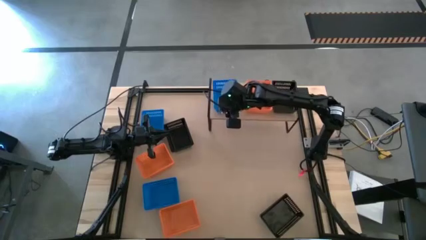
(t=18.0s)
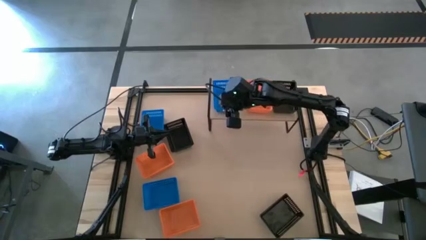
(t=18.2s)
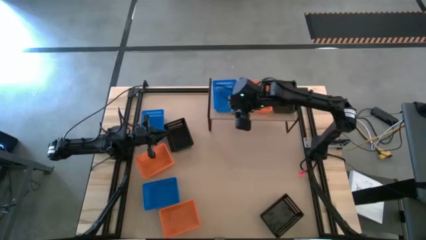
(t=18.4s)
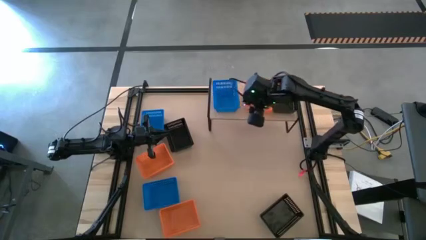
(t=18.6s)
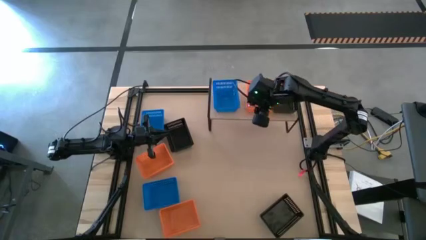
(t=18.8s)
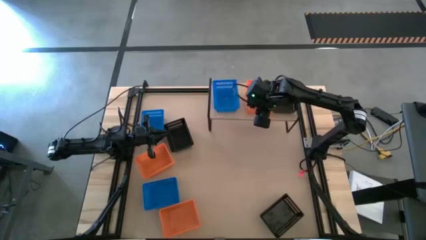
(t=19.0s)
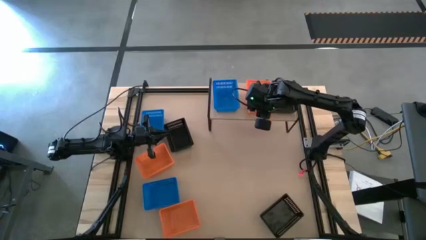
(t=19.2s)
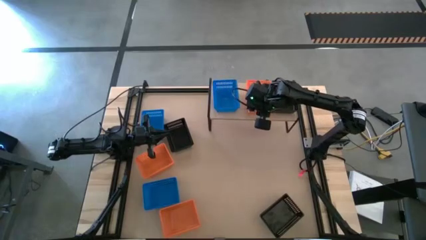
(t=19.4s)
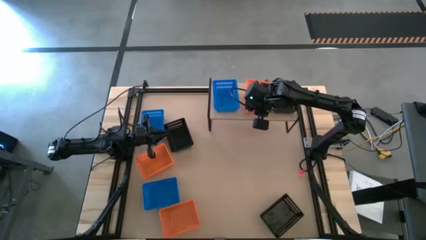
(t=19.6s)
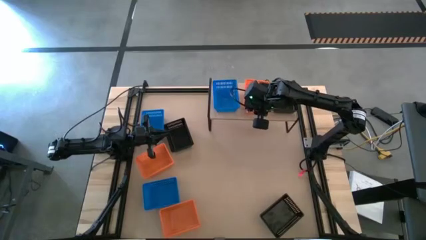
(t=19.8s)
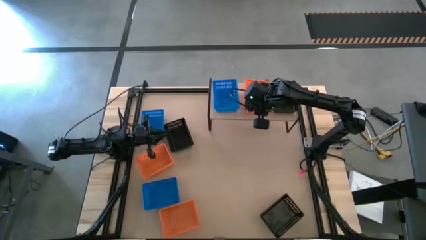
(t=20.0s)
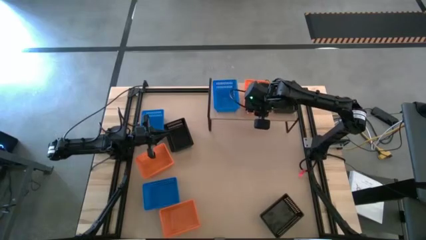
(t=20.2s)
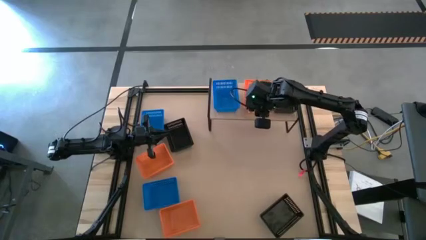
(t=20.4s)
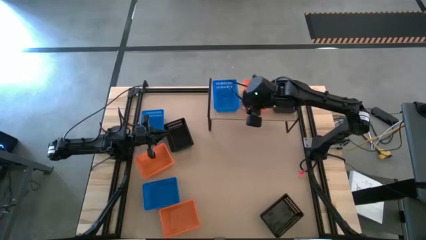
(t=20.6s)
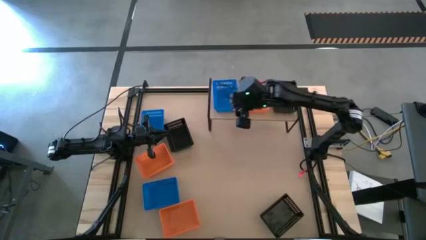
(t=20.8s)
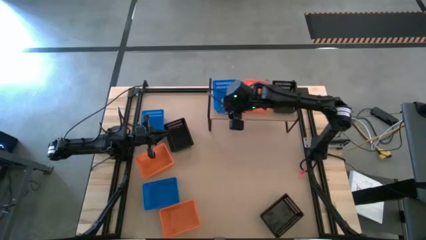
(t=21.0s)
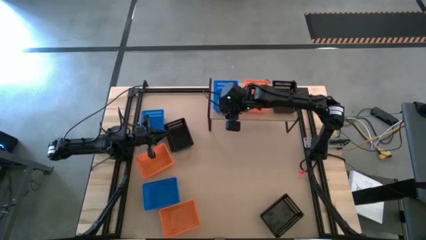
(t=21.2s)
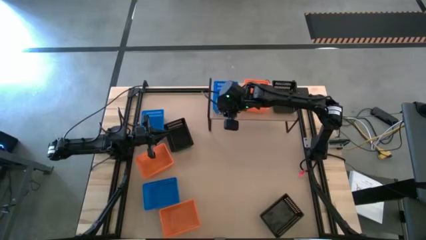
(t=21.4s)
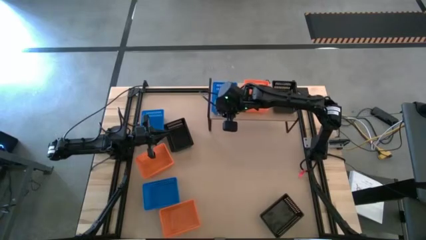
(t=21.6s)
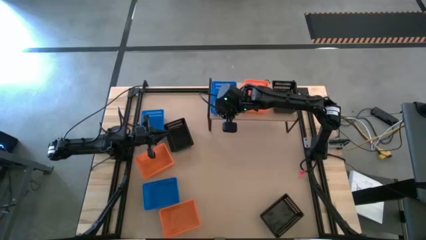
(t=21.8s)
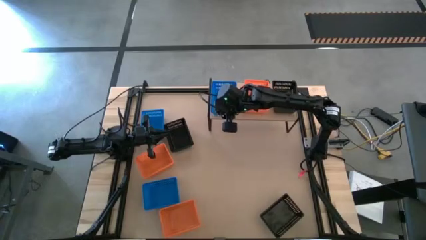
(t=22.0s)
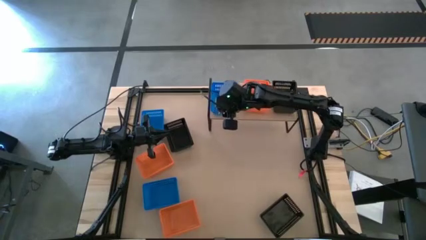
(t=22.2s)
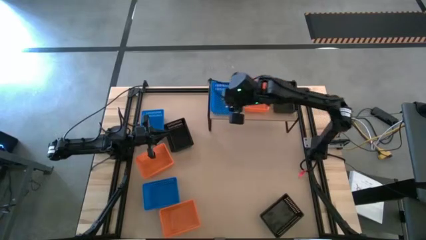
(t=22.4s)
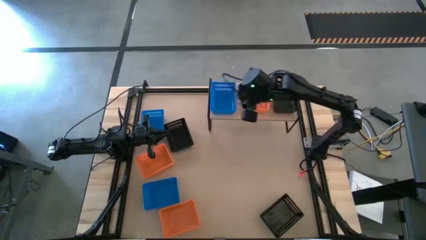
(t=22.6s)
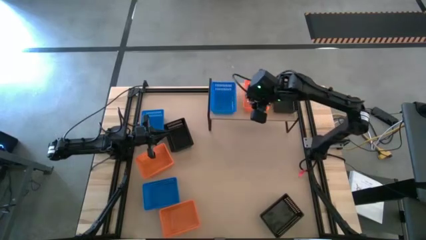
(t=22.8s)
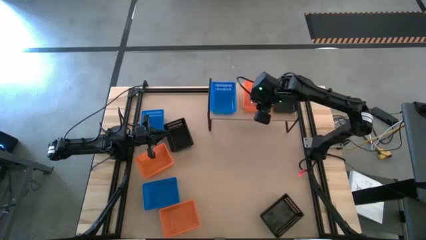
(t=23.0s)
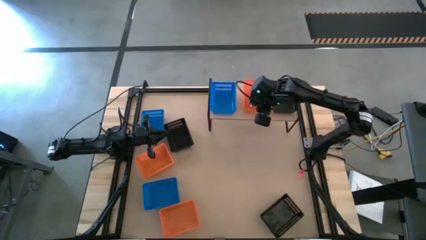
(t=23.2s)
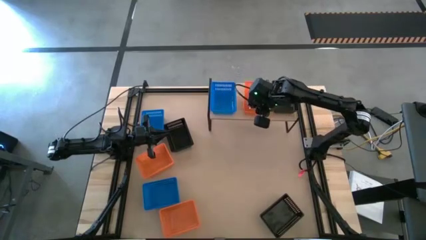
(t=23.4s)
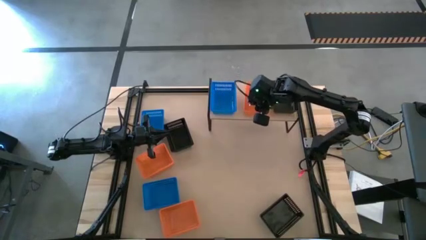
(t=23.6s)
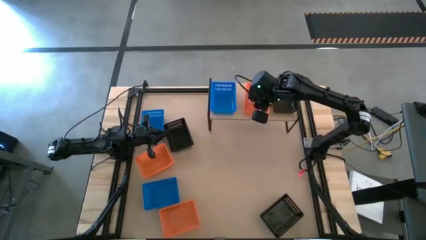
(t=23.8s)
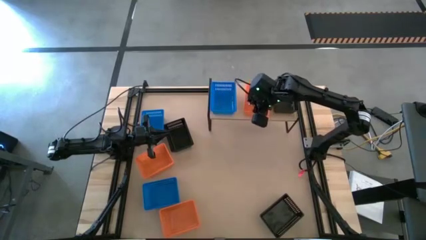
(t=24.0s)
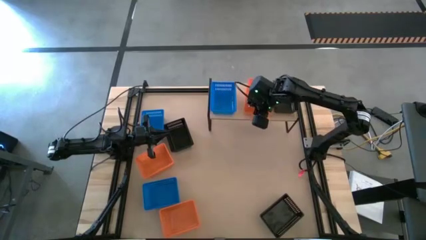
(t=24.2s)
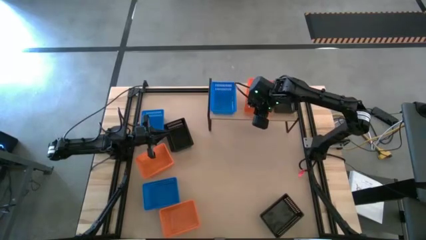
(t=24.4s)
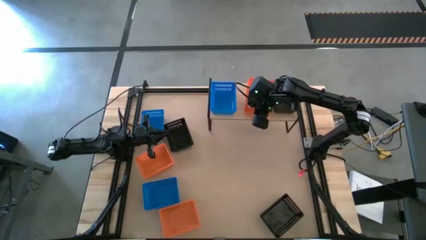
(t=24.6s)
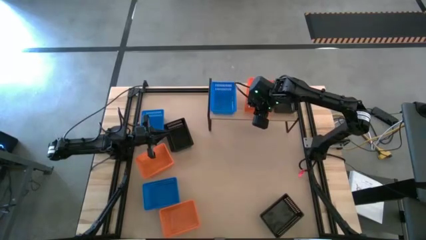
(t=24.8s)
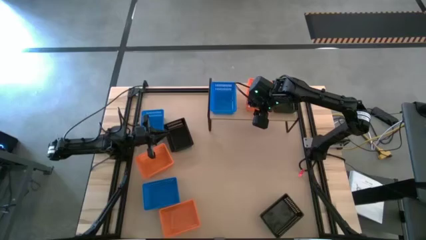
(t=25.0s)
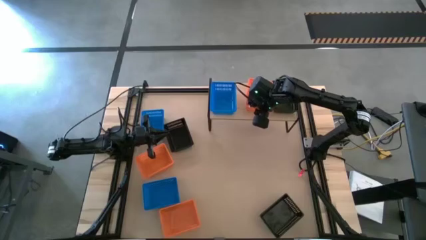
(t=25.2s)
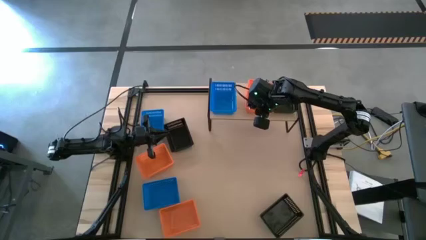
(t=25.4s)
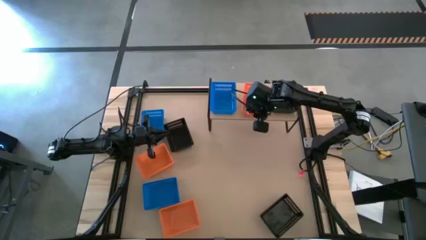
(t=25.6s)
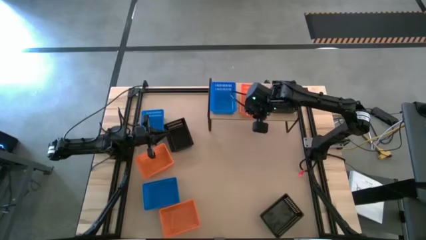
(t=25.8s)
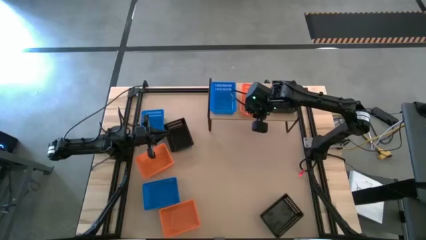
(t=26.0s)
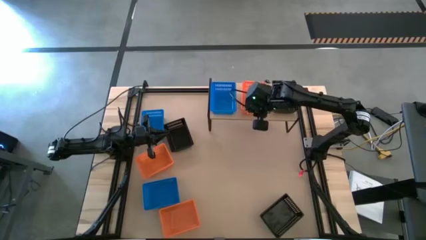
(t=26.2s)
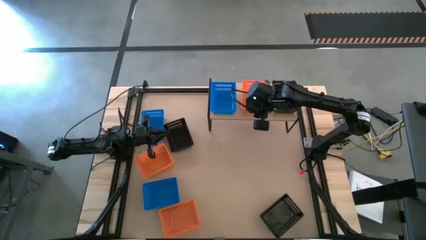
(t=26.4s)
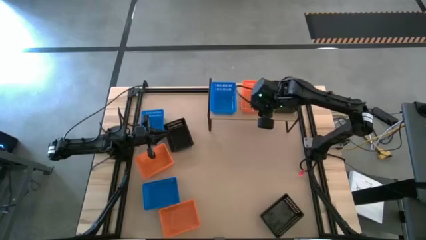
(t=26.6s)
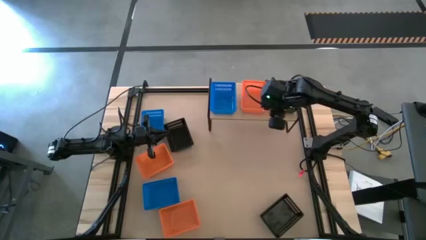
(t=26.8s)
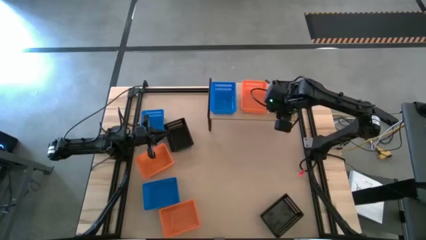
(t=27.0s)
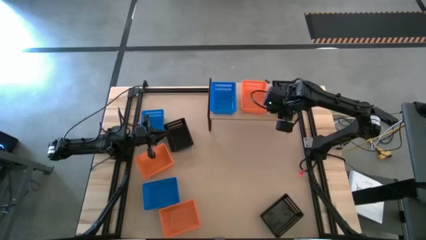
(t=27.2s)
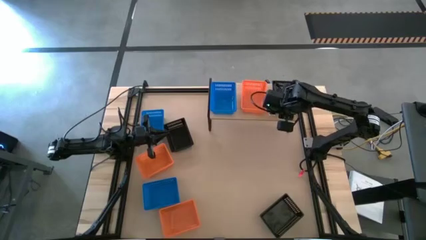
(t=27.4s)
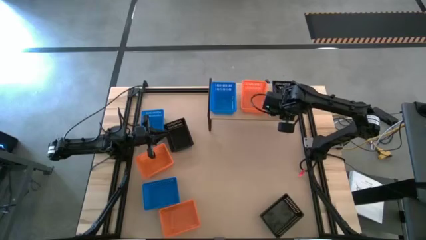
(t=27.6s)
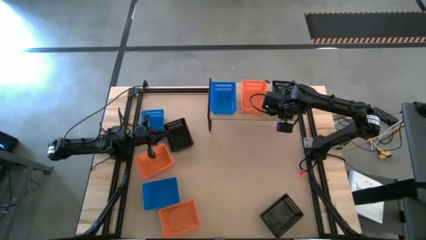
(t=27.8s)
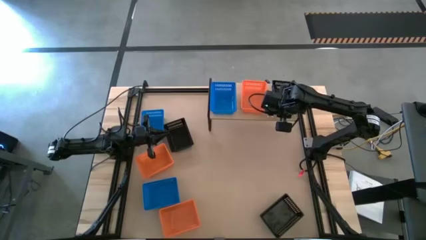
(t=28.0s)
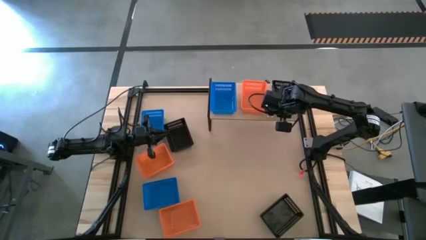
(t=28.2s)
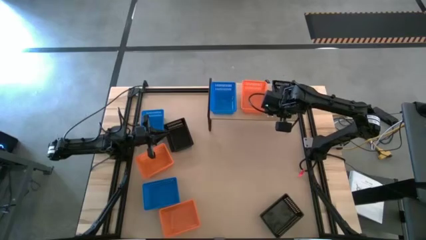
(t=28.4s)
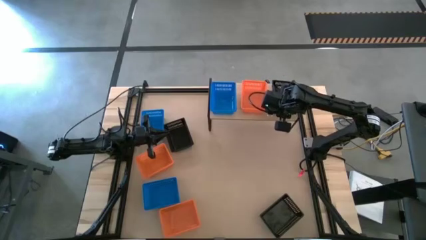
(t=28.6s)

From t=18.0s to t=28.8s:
Task: Stack baskets on shelf by color
Adjust the bins on the shelf

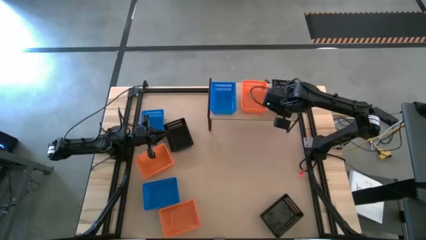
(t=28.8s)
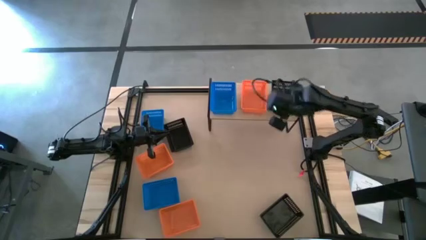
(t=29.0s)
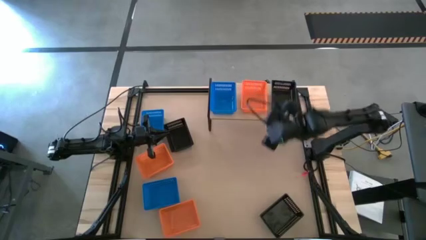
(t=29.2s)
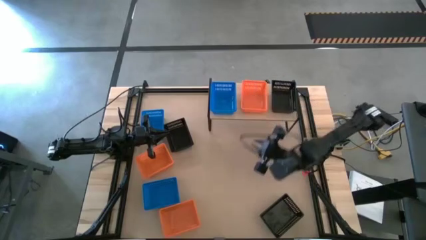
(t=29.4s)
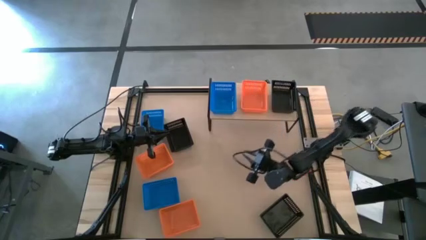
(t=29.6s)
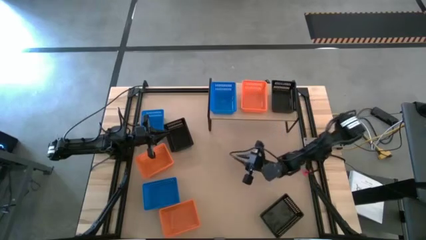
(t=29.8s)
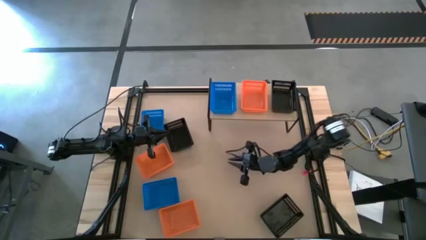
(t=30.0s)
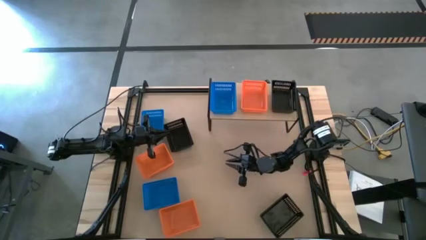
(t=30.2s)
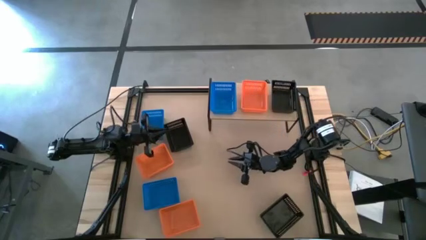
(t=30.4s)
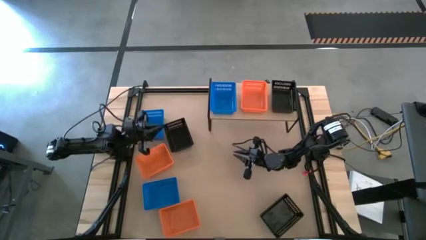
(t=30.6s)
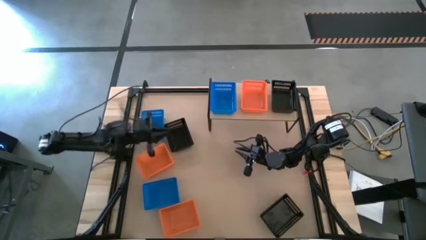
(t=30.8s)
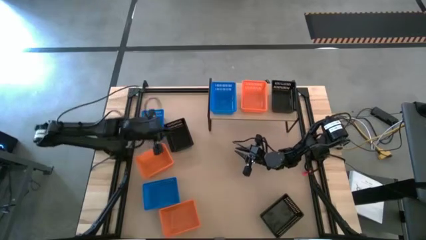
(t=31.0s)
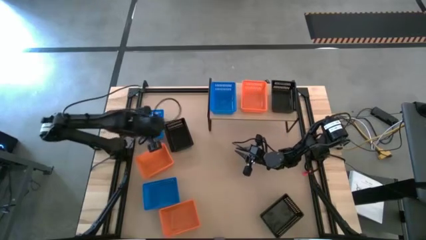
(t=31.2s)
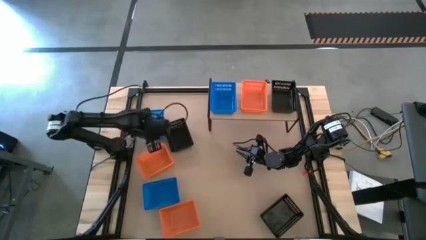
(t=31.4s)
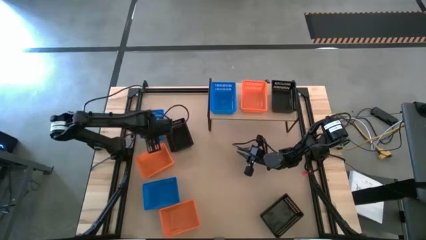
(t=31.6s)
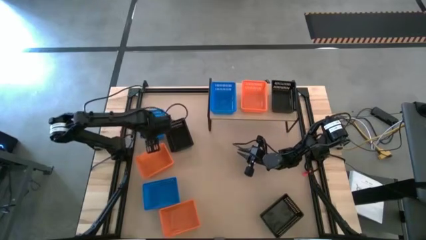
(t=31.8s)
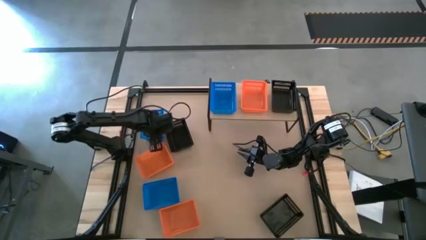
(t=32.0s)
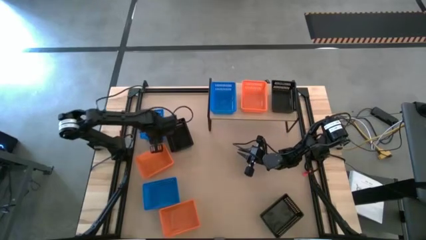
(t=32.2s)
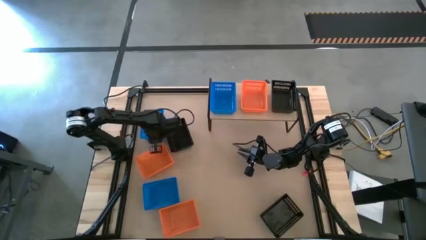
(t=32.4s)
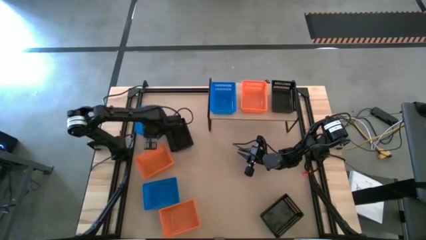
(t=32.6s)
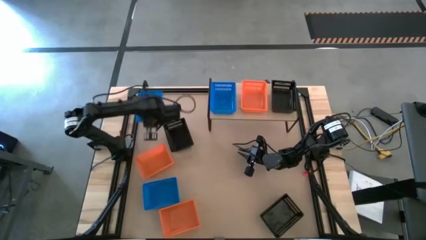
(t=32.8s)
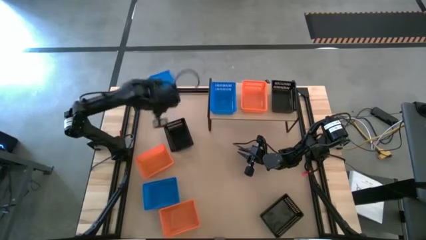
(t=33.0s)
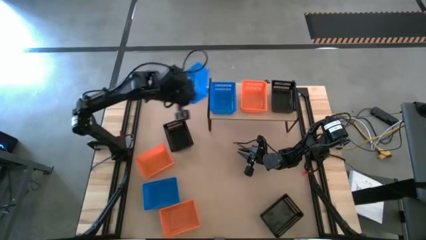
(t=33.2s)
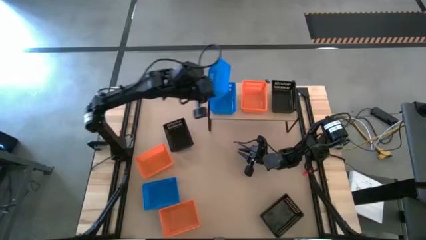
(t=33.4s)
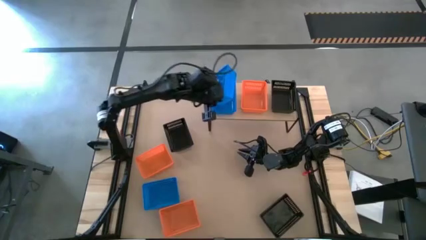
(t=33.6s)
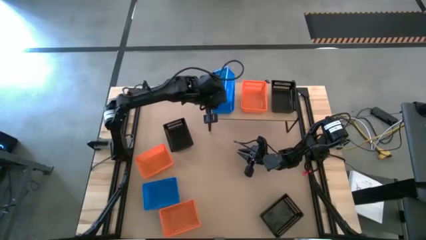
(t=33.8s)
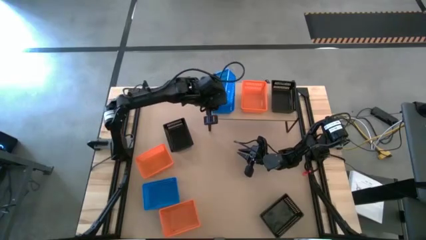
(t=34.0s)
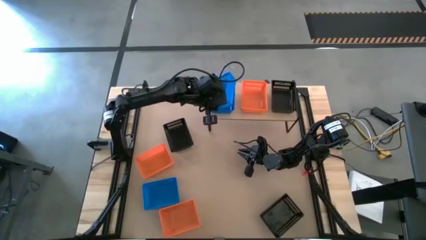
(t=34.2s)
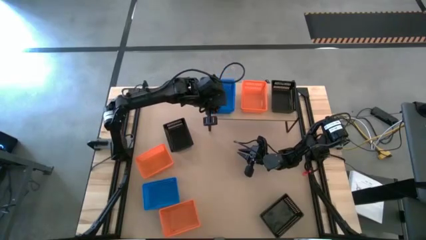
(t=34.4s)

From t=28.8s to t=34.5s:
Stack the top blue bin on top of the other blue bin on the shelf
